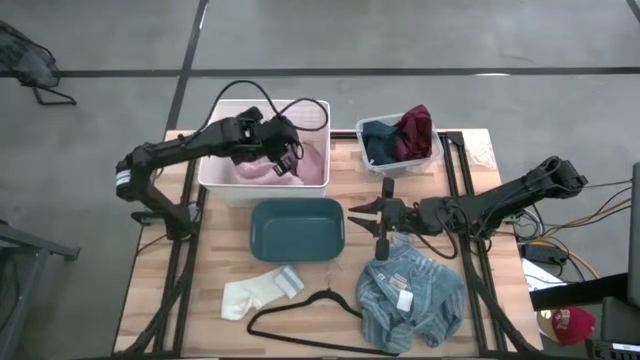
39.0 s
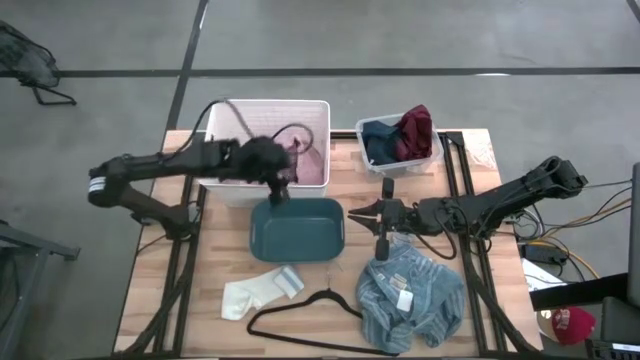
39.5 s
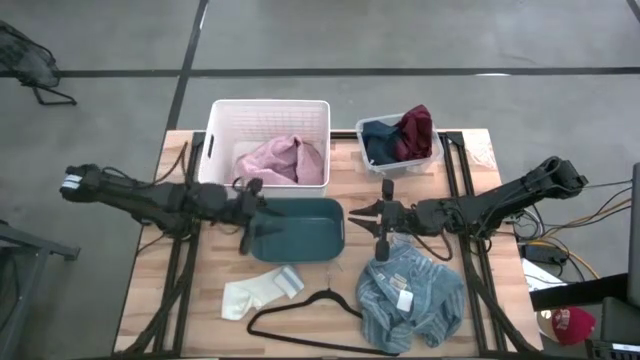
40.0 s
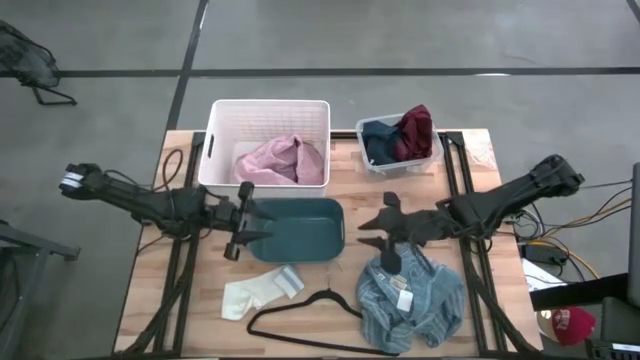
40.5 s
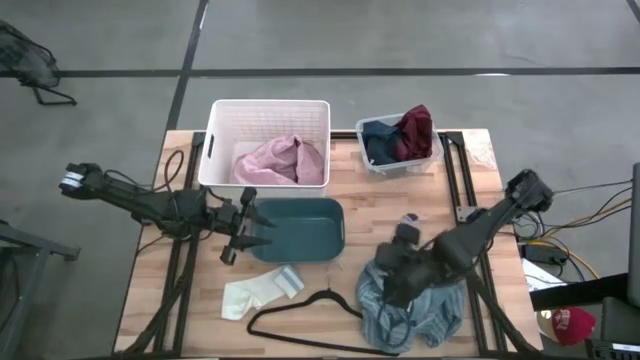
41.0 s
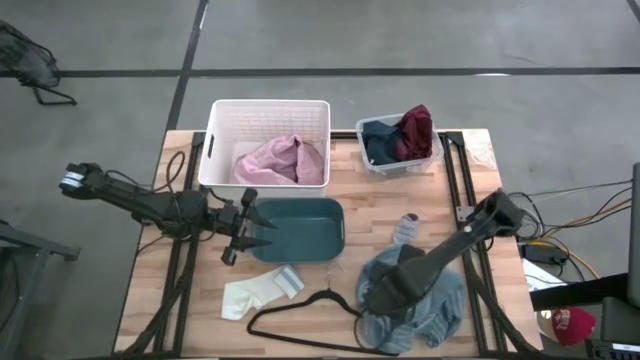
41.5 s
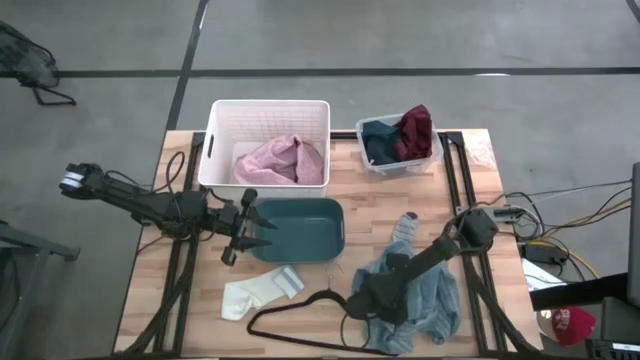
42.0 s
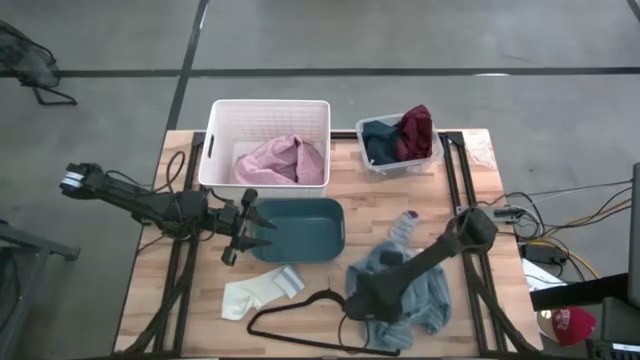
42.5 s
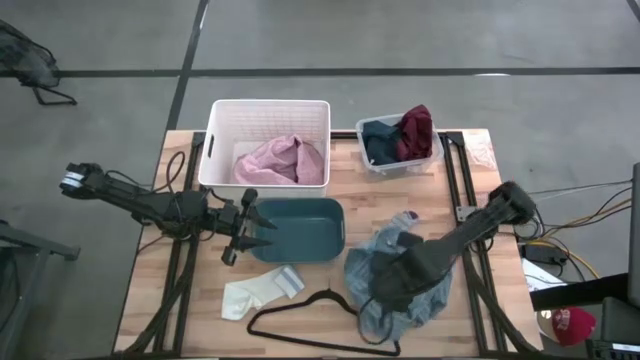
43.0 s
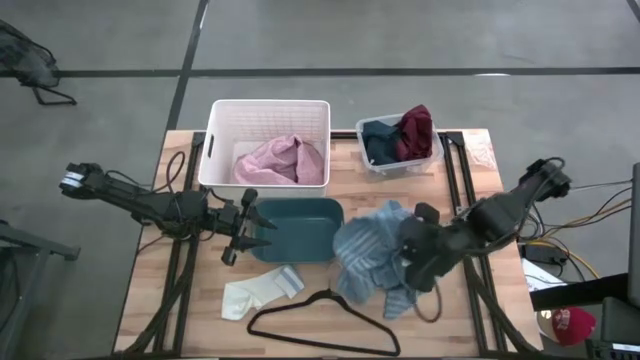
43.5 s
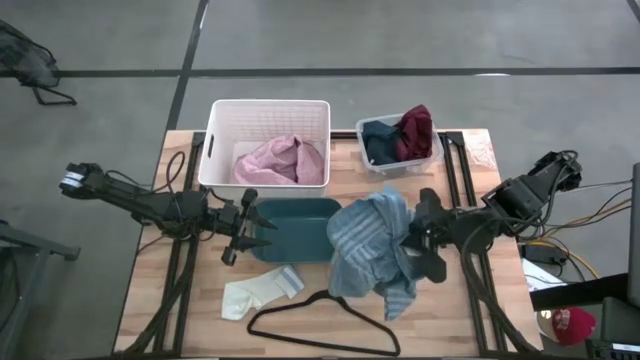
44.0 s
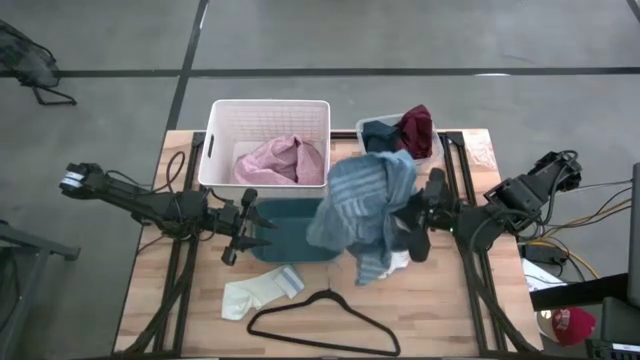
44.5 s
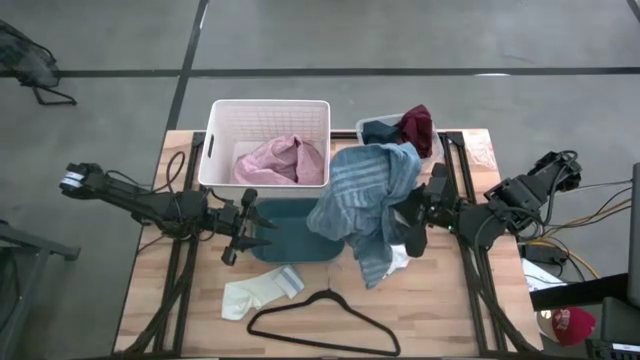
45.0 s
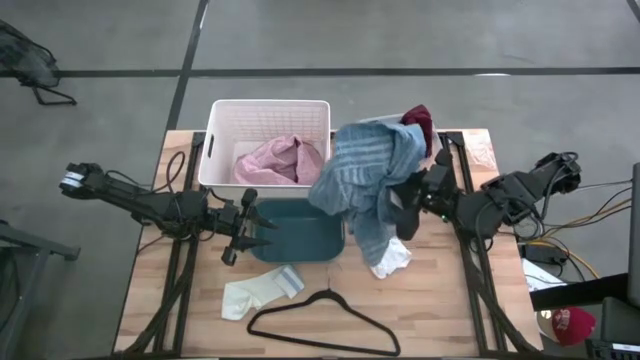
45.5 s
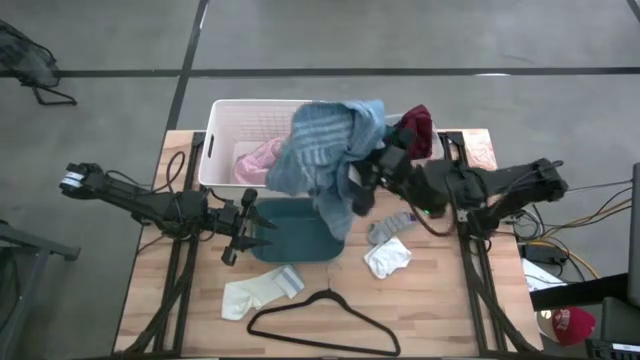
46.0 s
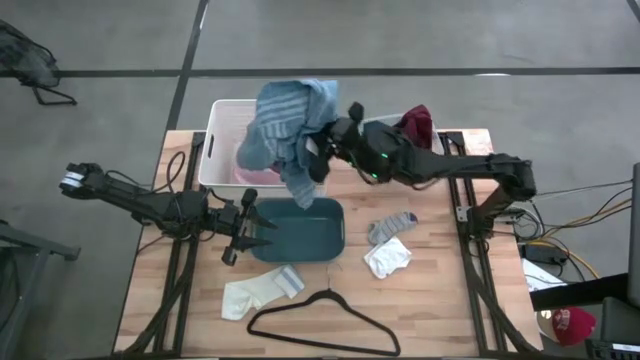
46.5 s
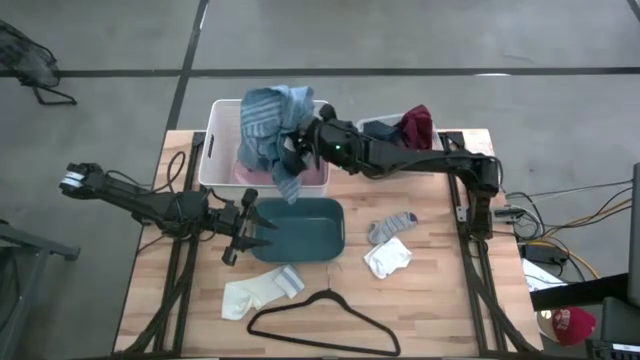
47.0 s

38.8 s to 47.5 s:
Task: Pick & Place Cloths
Put the blue polo shirt into the white bin

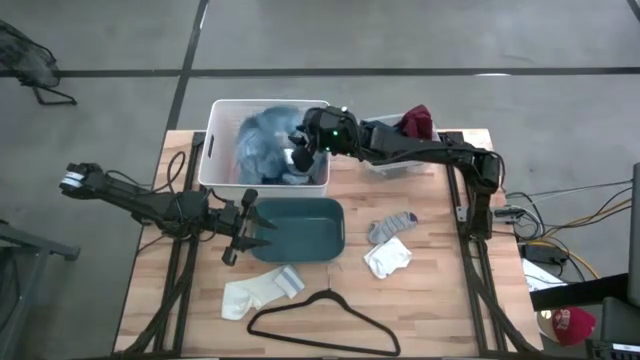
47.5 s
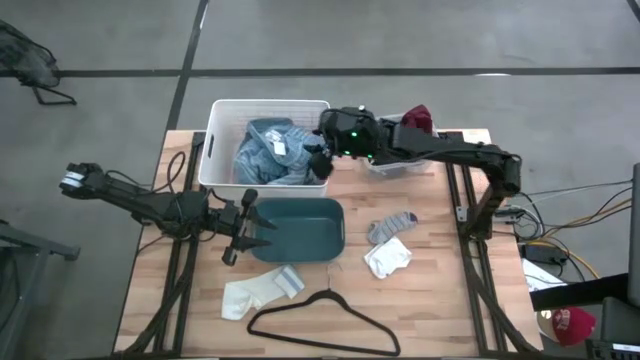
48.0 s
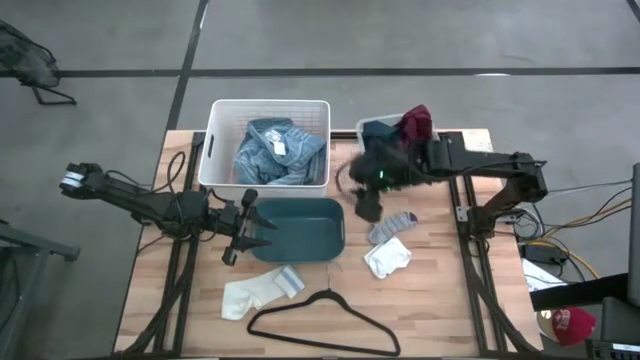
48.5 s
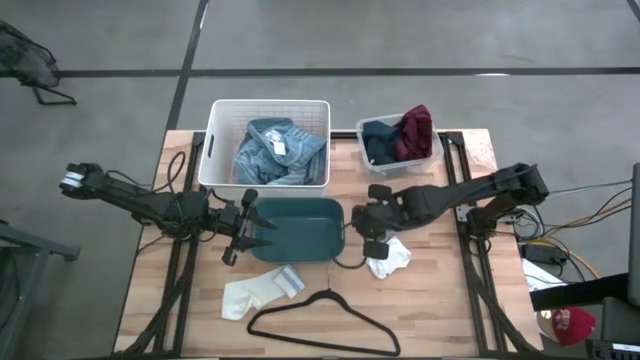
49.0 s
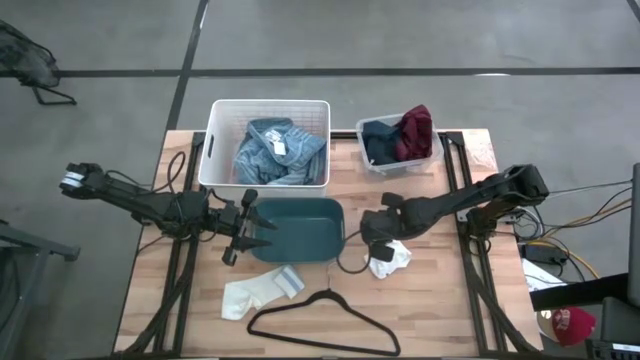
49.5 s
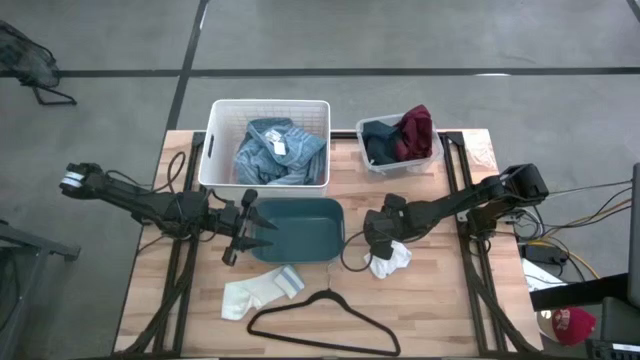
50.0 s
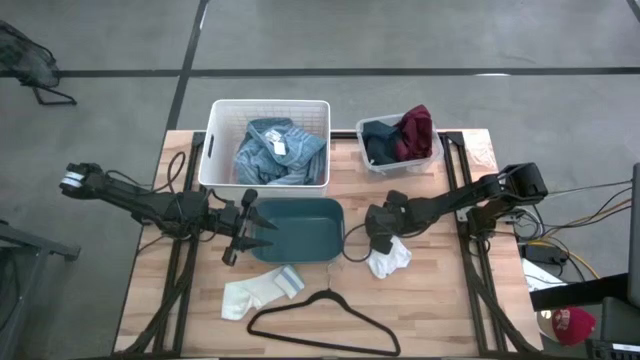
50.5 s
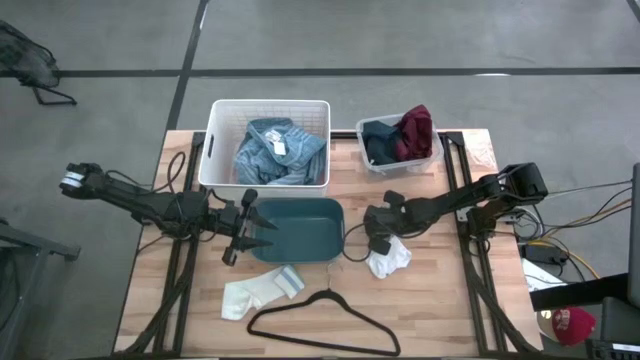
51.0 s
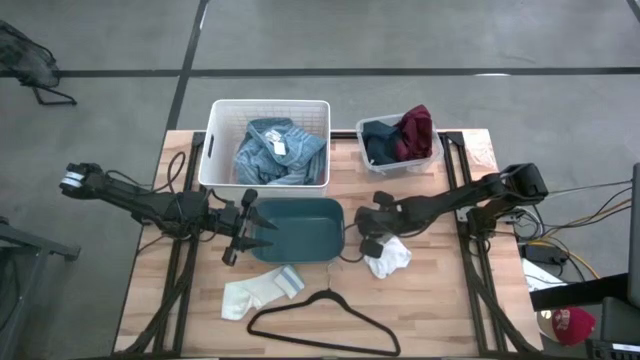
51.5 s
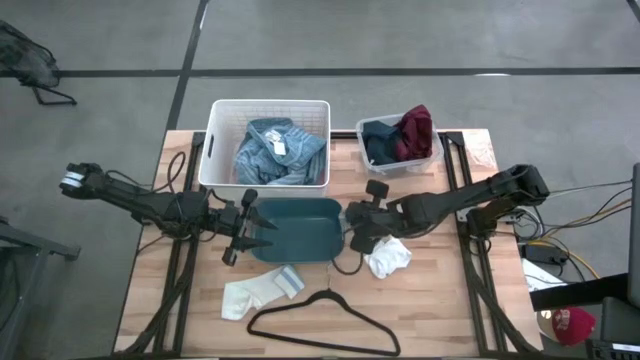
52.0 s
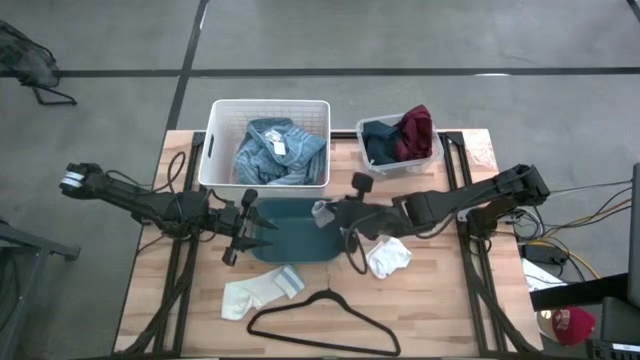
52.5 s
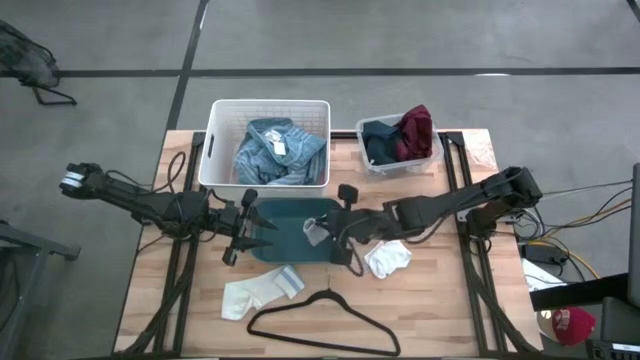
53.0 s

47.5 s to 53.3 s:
Put the gray sock into the blue bin

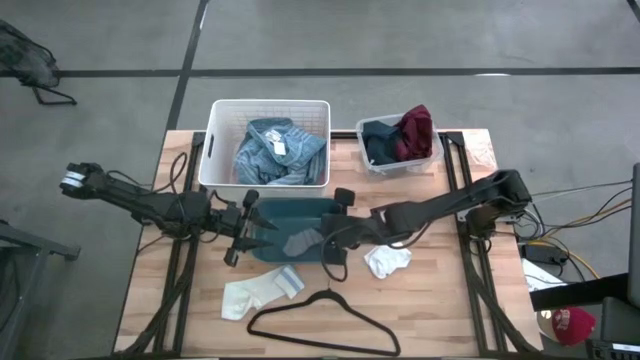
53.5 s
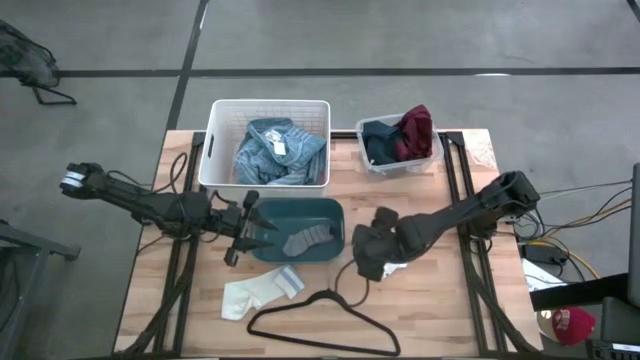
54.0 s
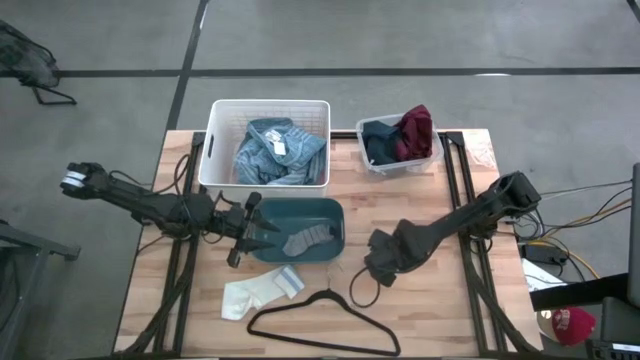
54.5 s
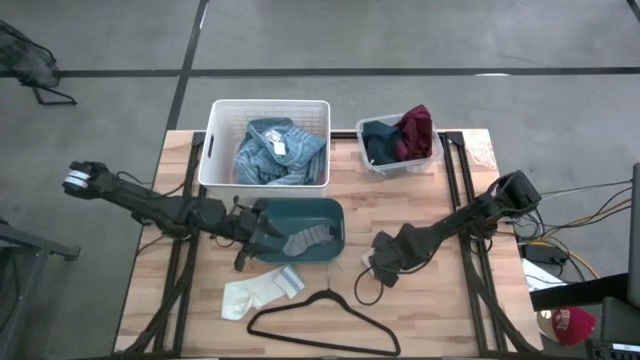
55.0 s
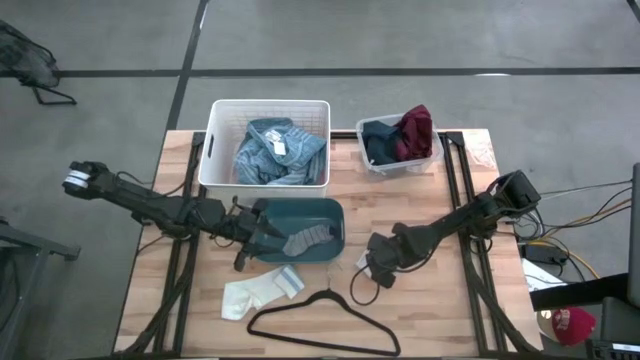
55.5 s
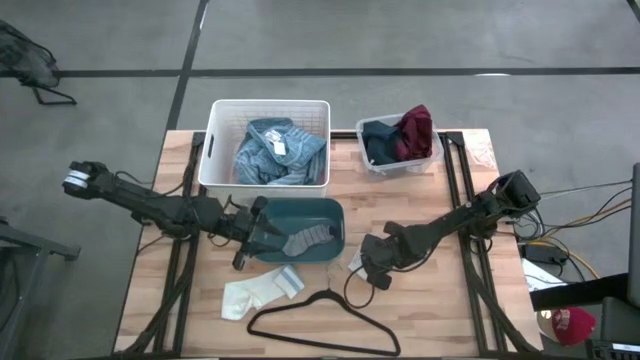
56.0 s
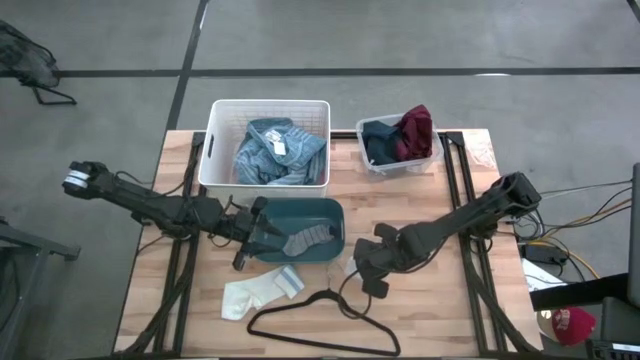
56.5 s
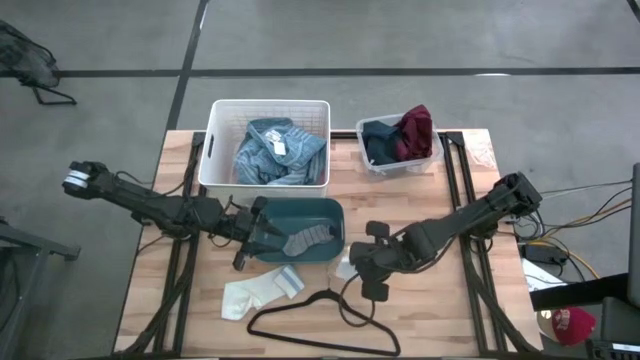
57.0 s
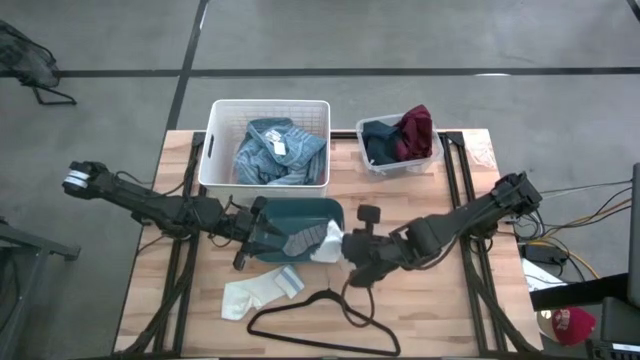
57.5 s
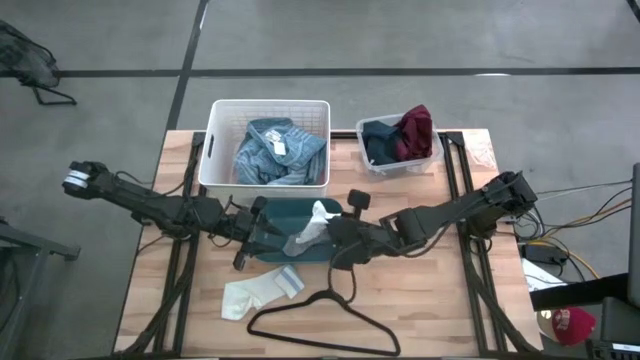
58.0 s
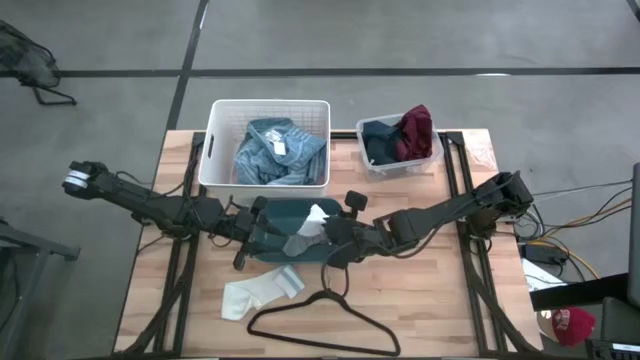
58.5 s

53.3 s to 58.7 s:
Put the white sock into the blue bin

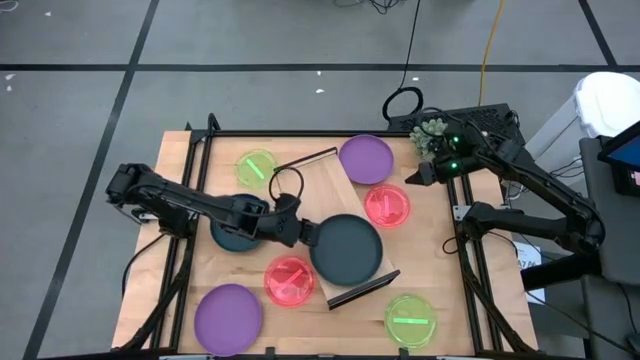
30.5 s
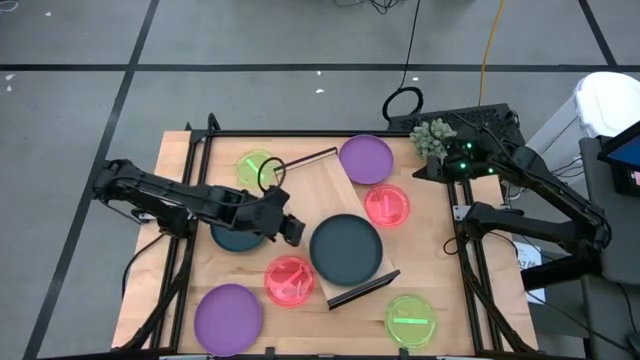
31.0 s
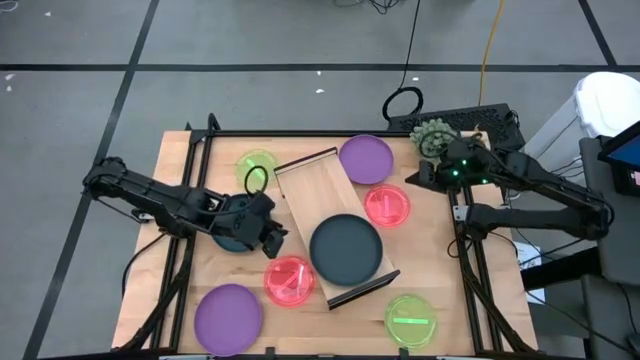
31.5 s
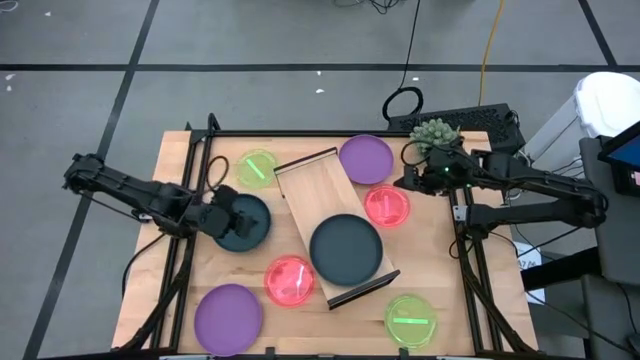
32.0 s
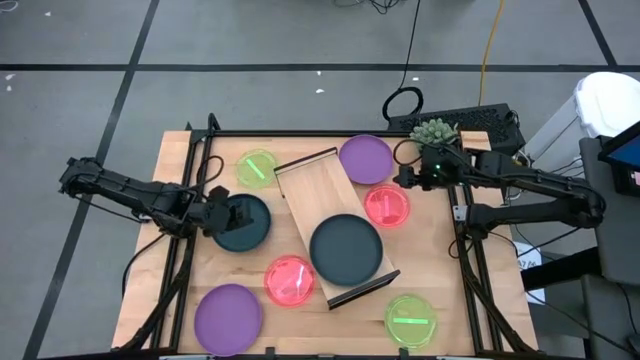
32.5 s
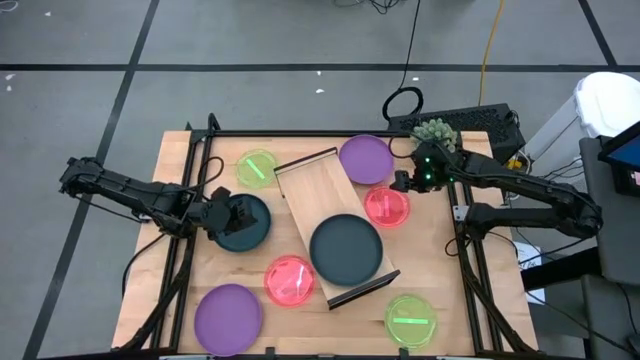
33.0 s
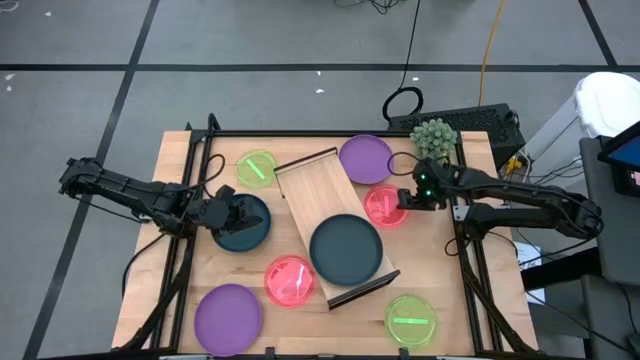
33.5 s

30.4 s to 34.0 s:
Task: Place and stack plates onto a shelf
Put the top pink plate on the shelf
